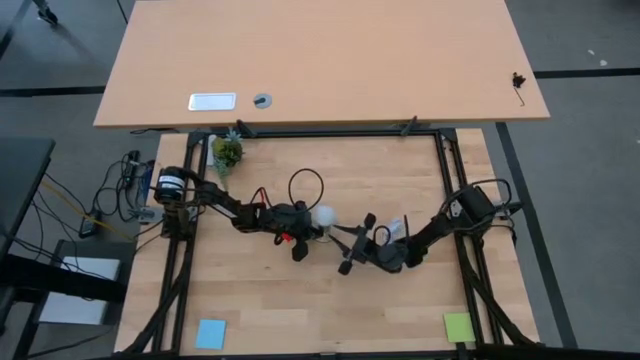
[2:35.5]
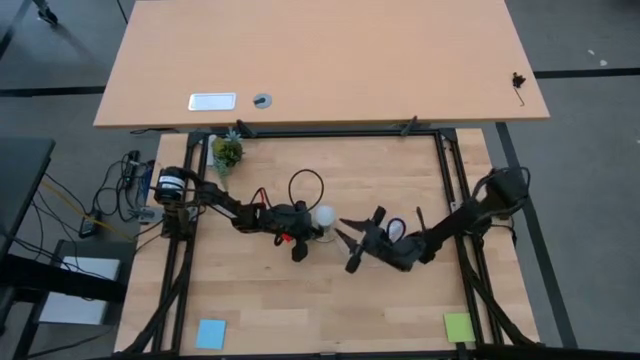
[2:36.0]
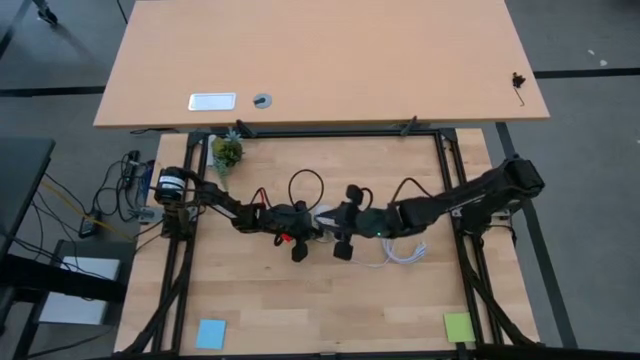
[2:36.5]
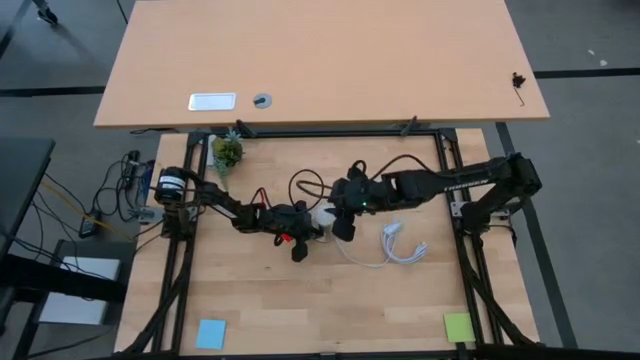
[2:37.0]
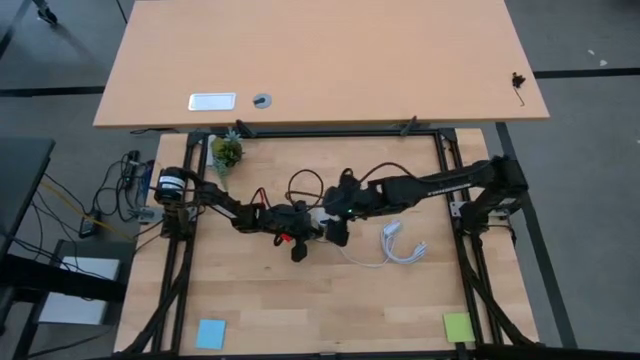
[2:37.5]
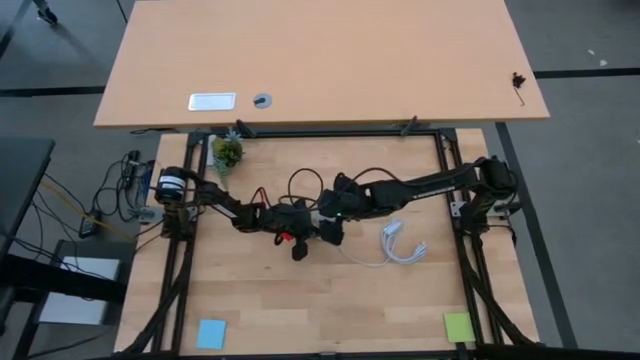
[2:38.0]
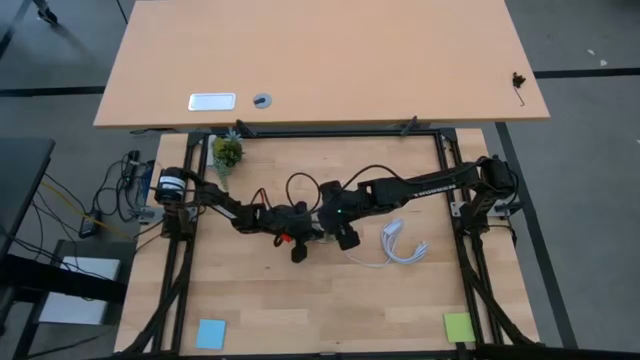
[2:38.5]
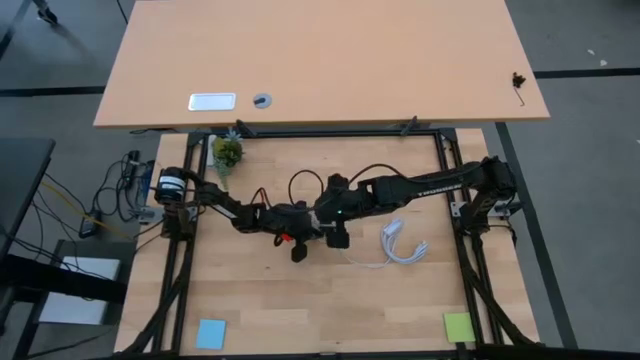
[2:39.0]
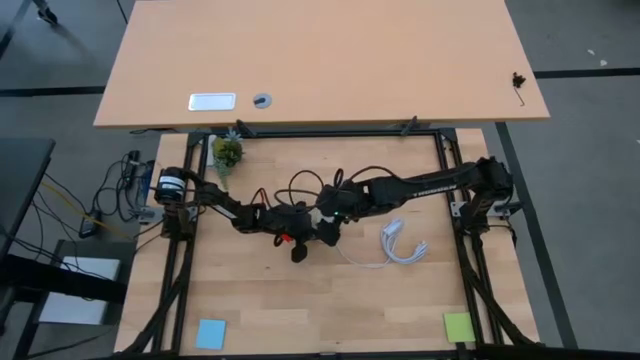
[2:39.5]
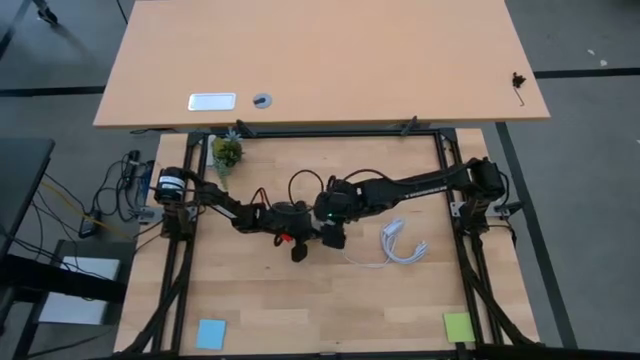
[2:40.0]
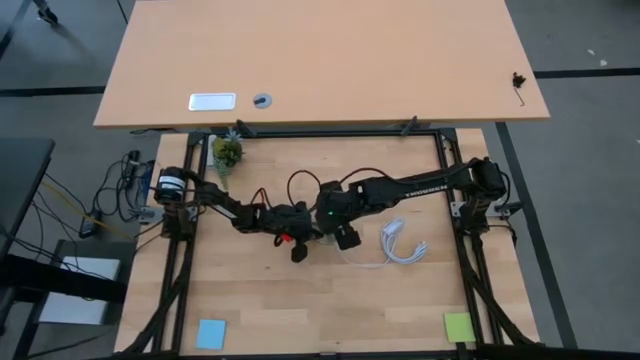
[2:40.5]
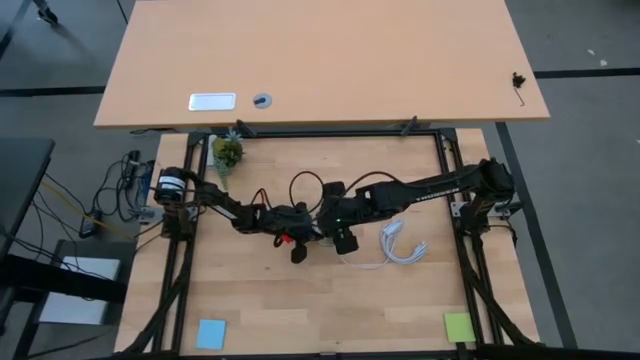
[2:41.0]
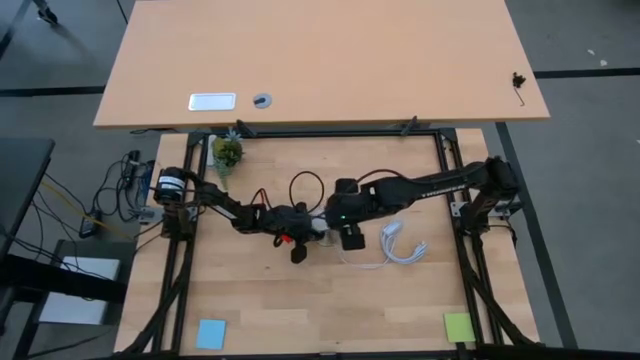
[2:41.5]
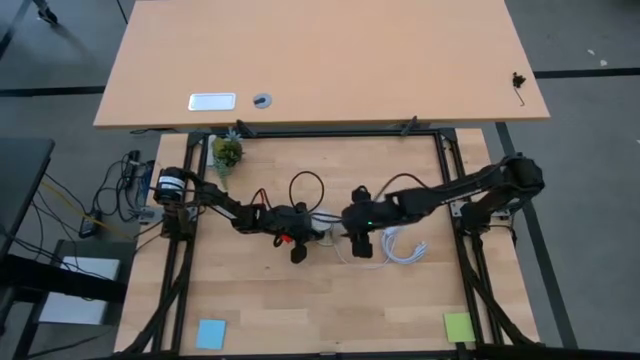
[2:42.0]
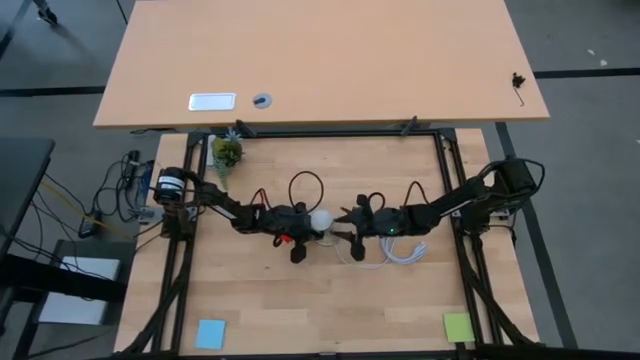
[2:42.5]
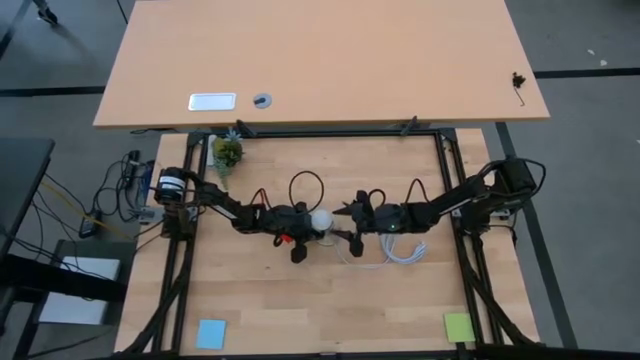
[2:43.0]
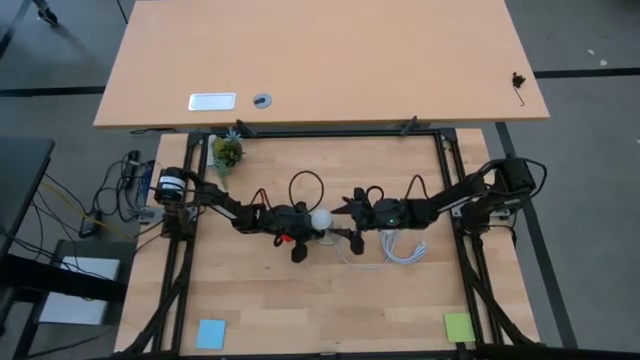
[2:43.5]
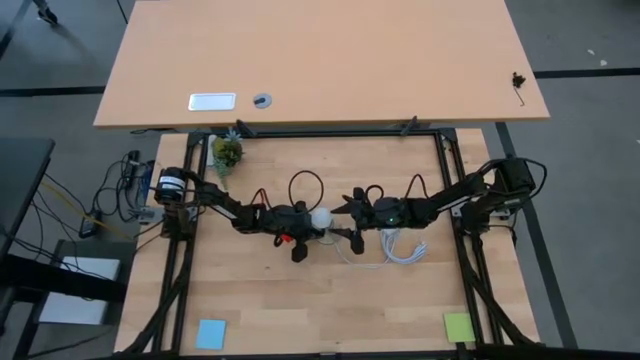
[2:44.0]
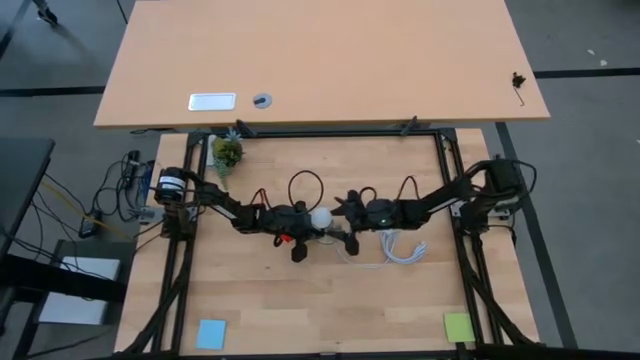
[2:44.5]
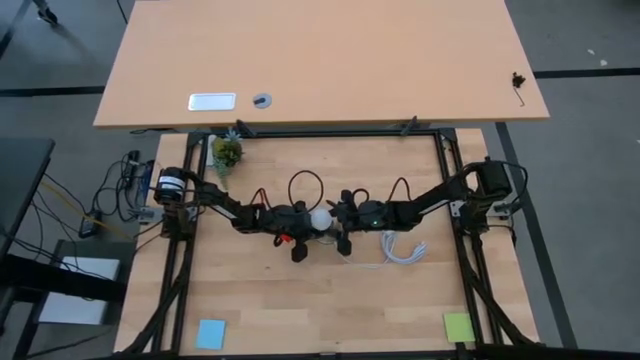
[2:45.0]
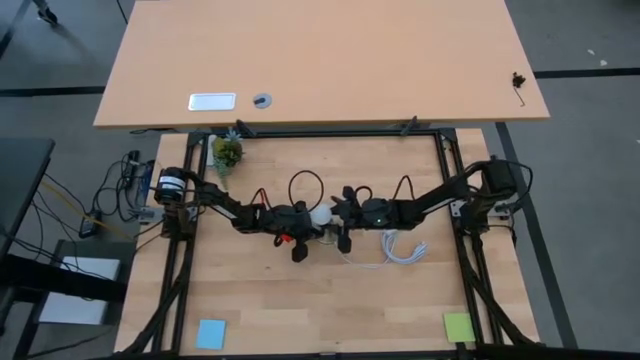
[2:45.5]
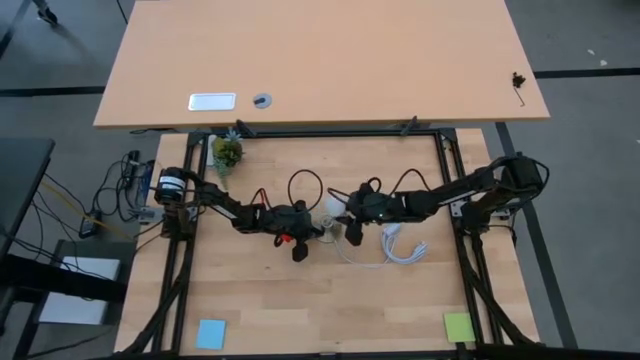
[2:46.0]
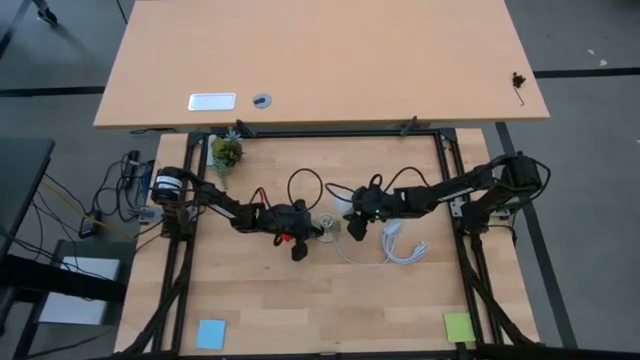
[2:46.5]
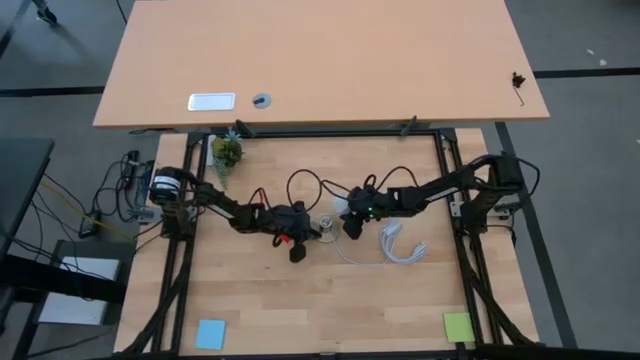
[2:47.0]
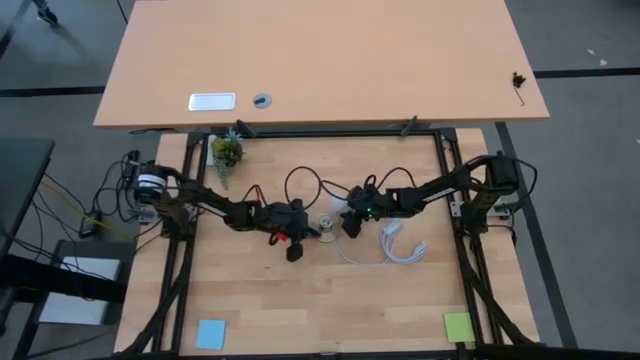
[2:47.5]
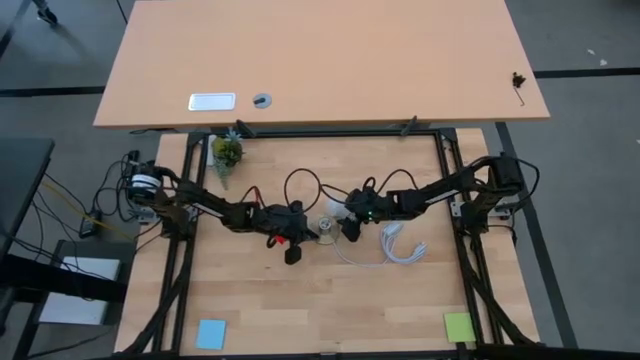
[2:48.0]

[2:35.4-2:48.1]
Task: Screw lightbulb
Remove the lightbulb from the lamp socket

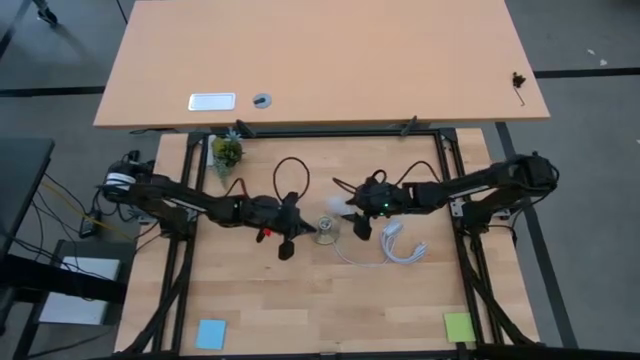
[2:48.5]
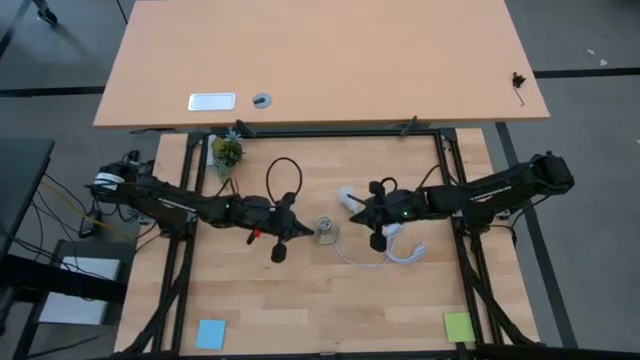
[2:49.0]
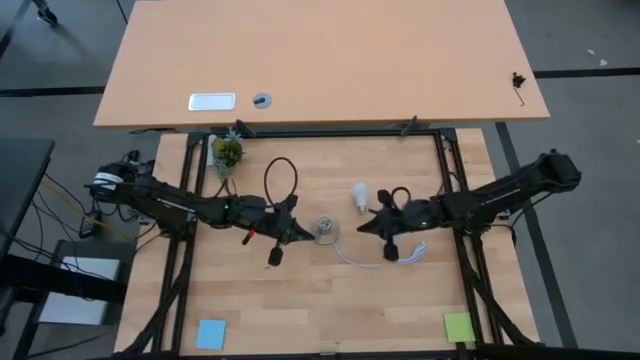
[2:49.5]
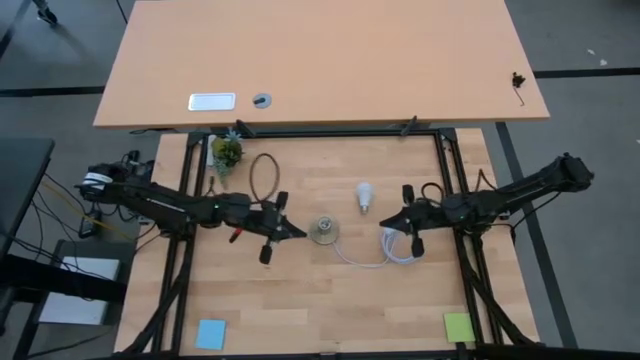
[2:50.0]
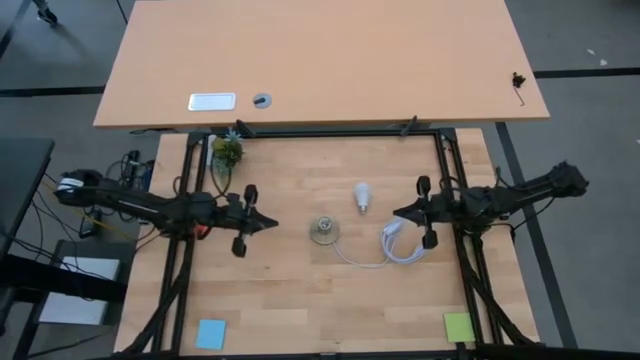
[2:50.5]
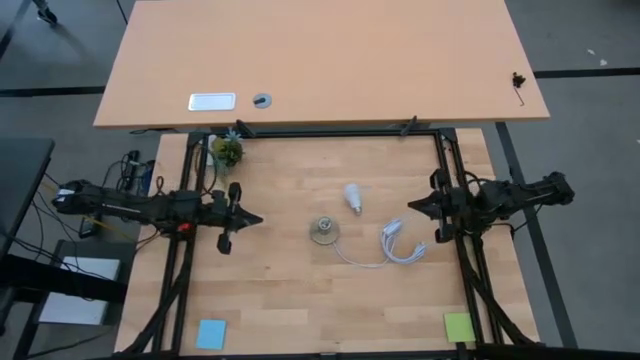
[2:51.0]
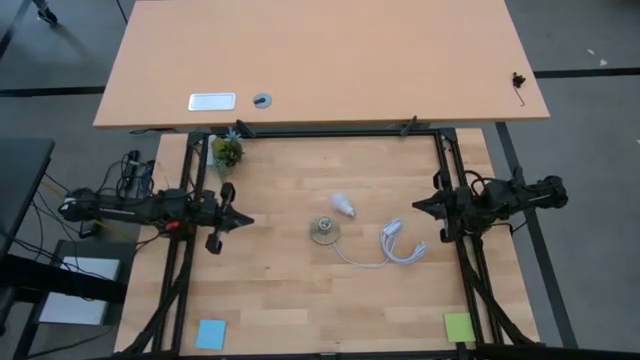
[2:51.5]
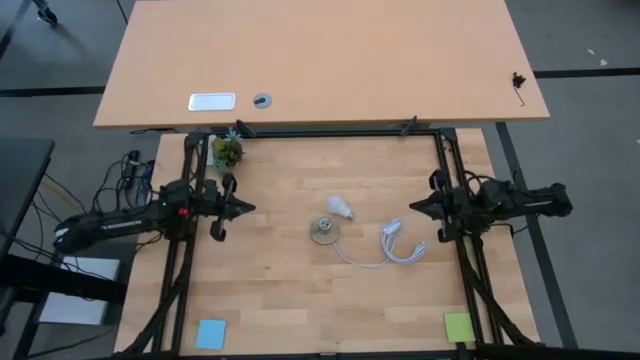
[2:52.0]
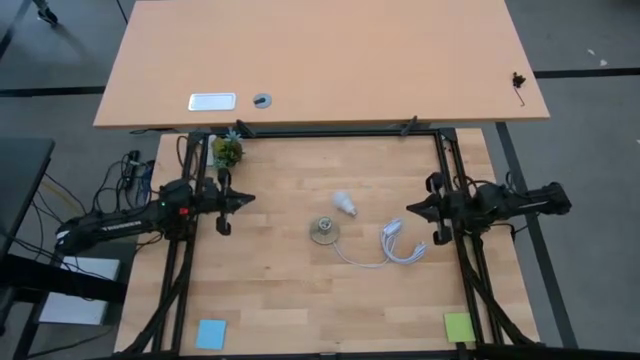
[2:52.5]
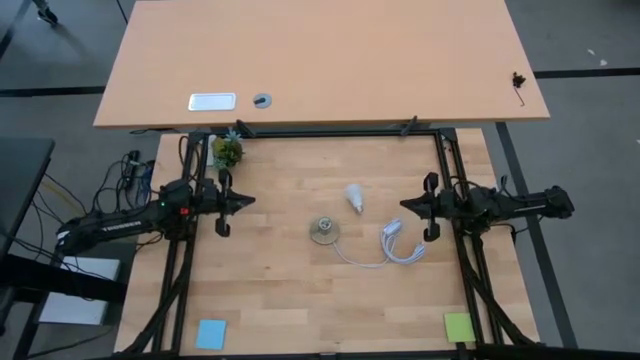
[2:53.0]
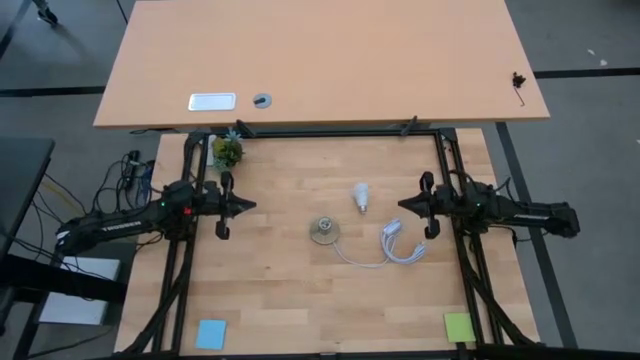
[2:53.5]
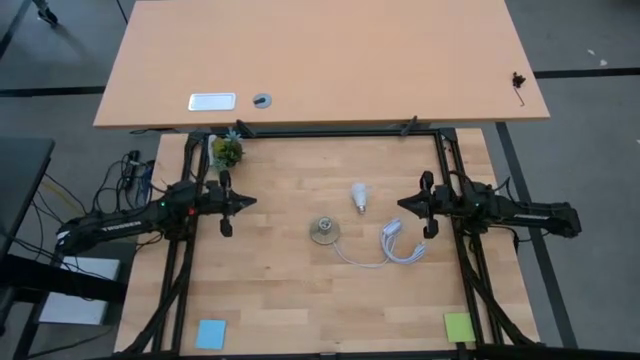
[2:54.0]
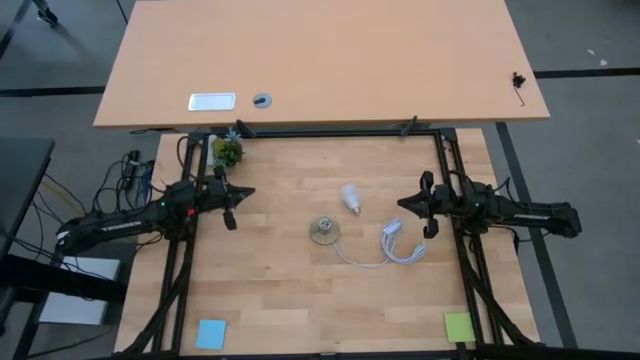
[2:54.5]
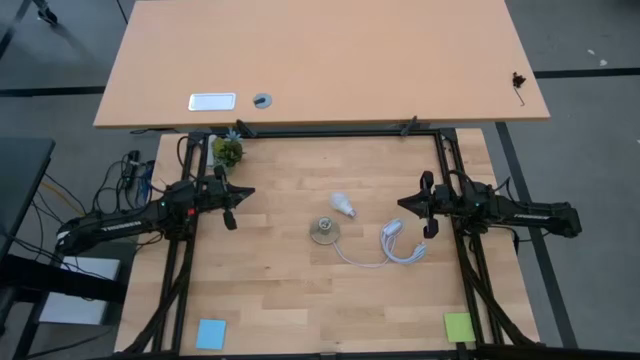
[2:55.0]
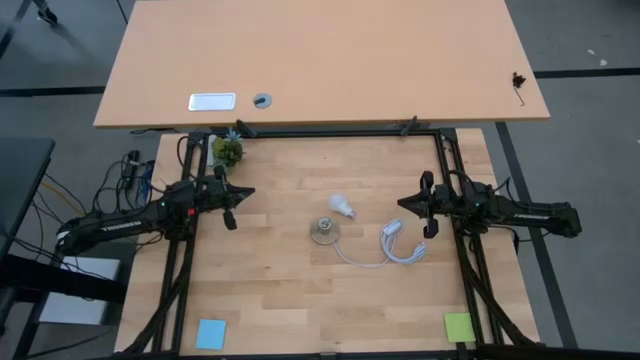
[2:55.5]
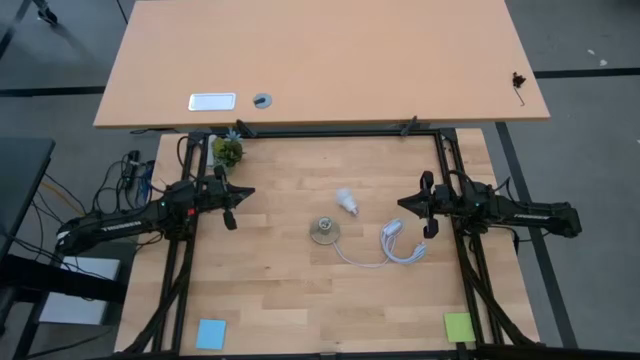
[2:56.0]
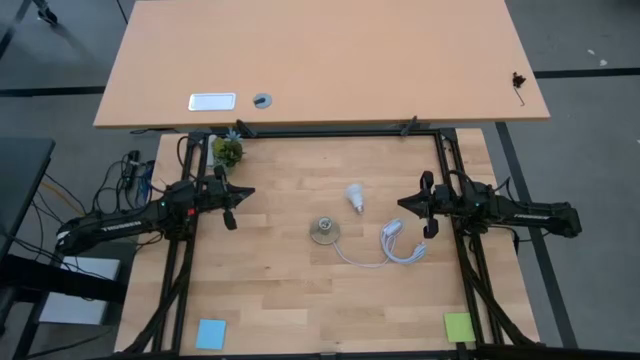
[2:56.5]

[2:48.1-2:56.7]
Return to Home Position
